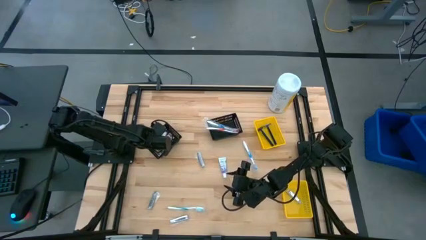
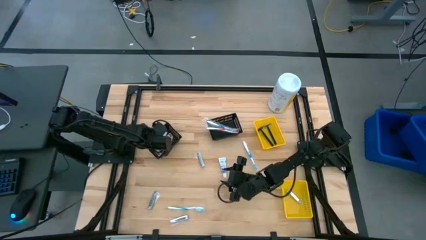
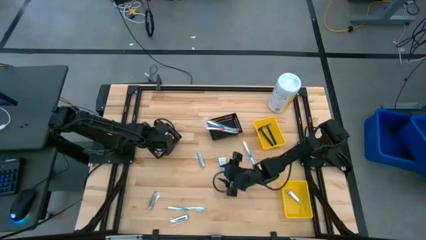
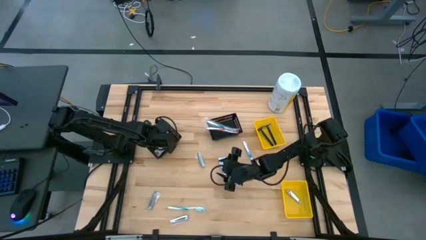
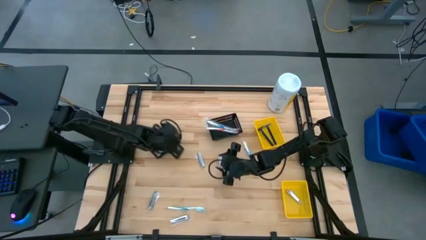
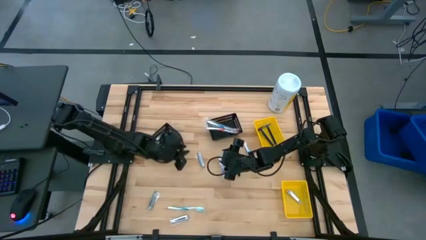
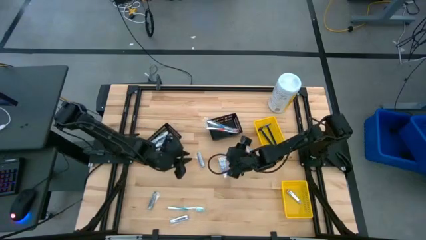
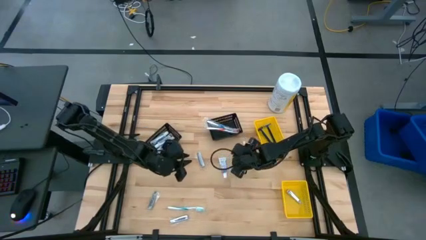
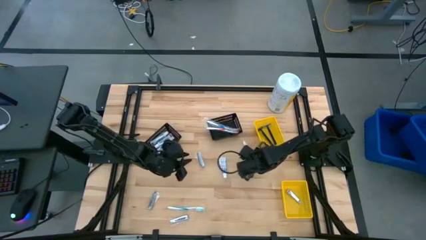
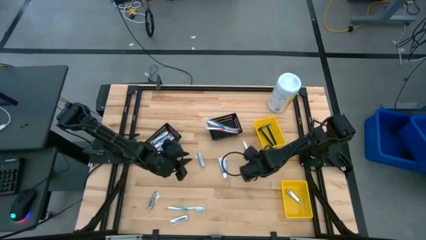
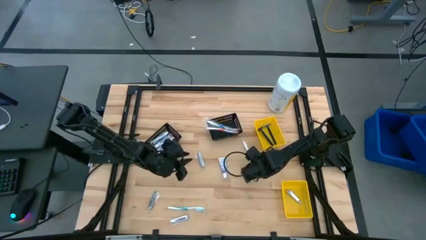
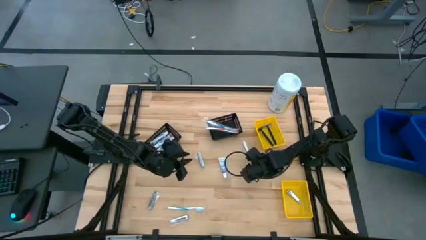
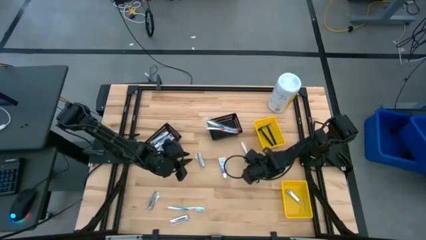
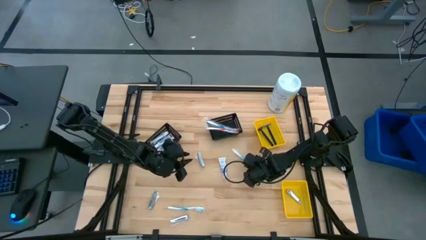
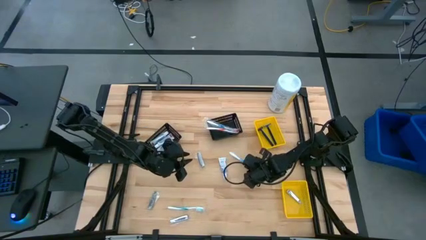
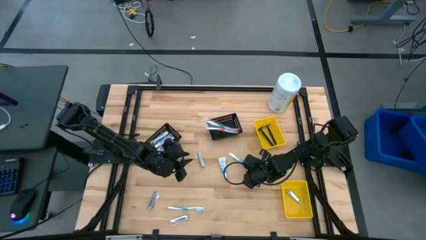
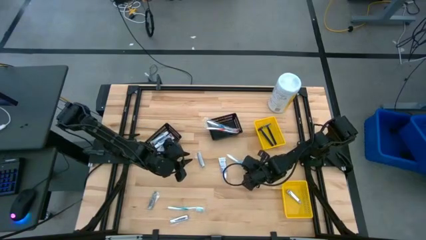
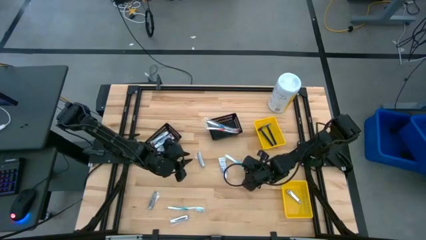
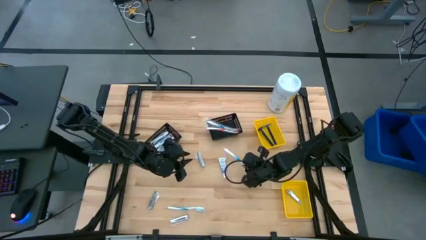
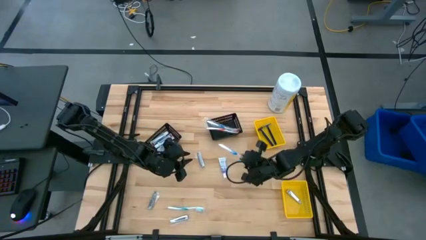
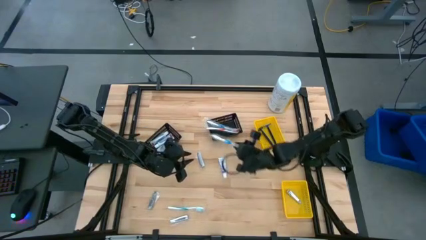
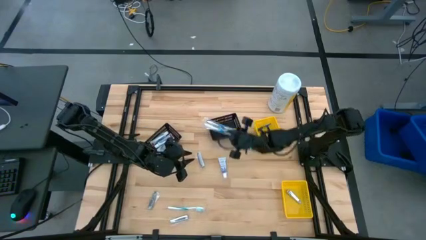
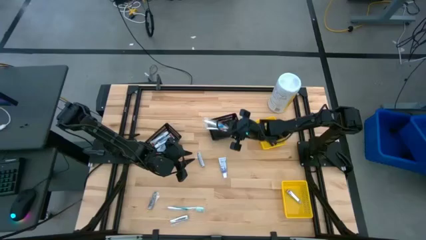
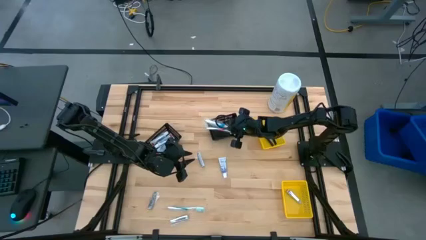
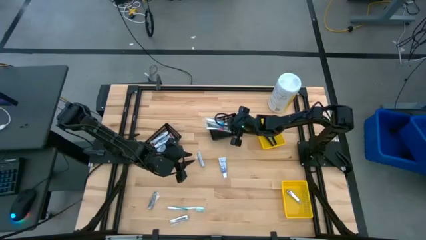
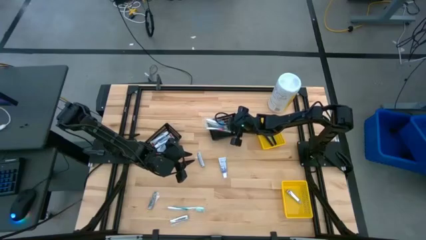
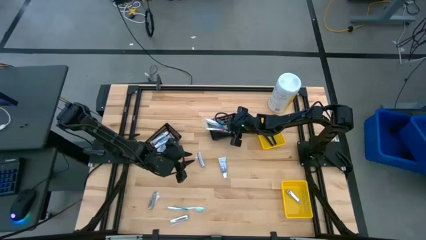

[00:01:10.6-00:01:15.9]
Task: Pick & Place Travel size toiletries
Put the blue toothbrush into the right black basket

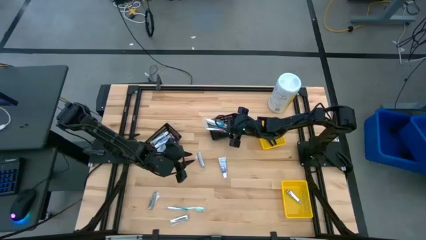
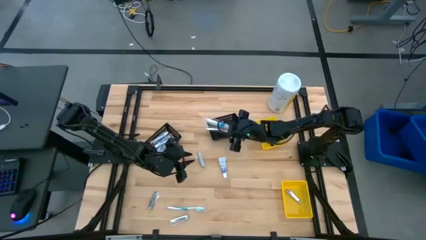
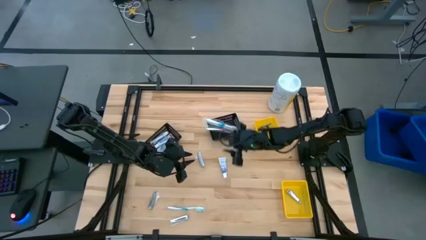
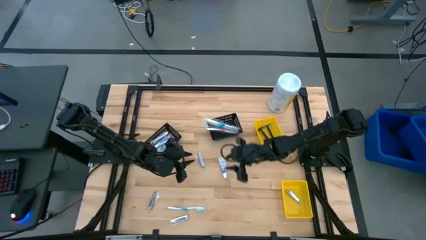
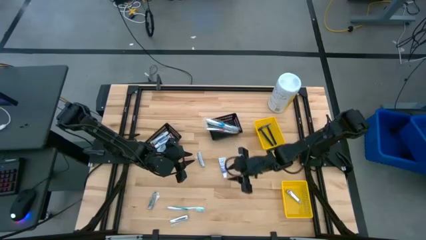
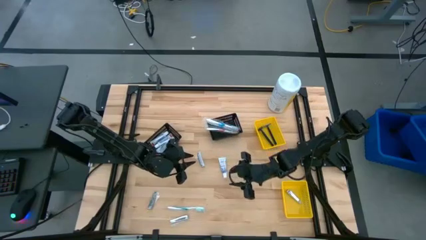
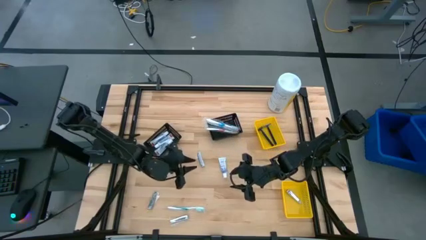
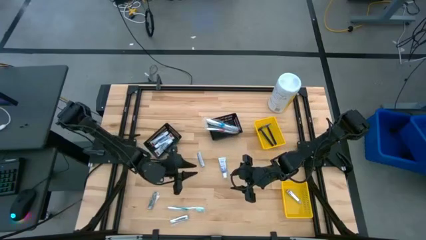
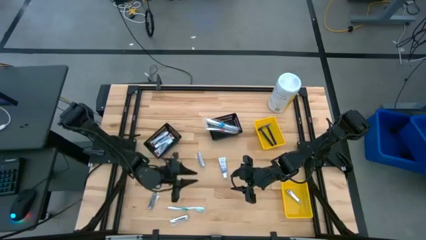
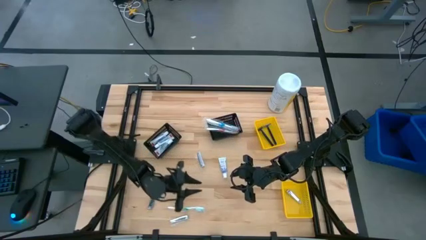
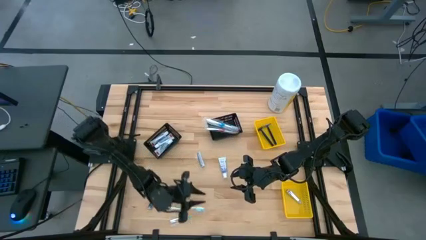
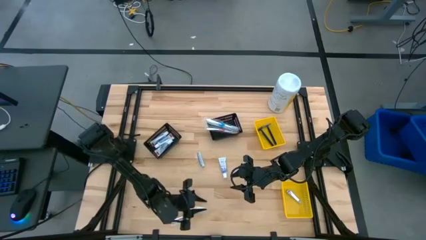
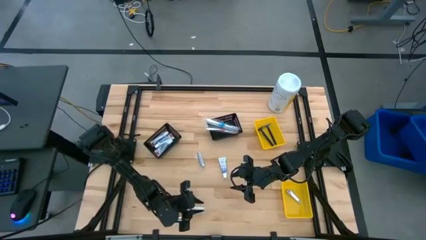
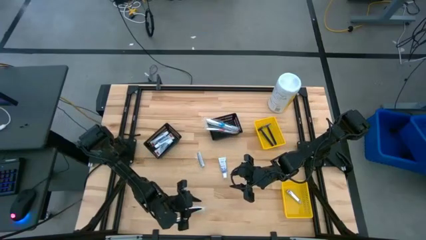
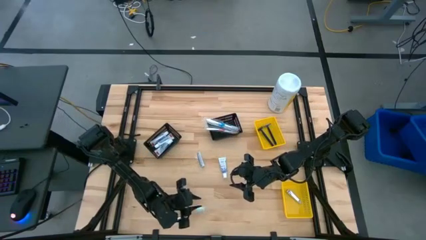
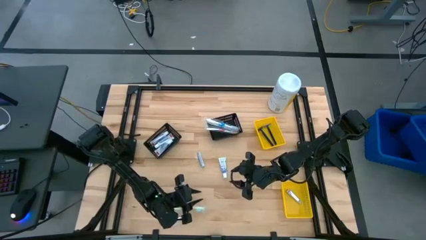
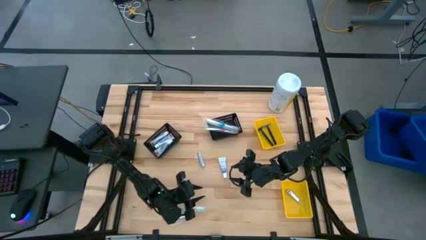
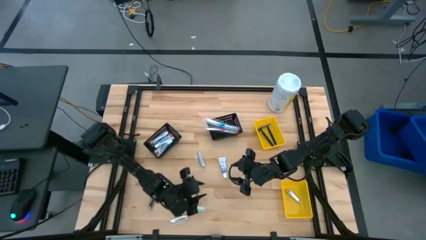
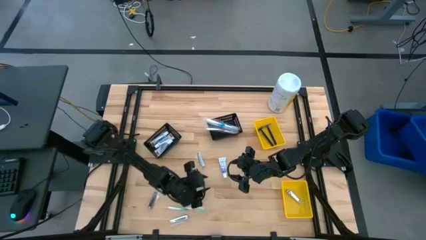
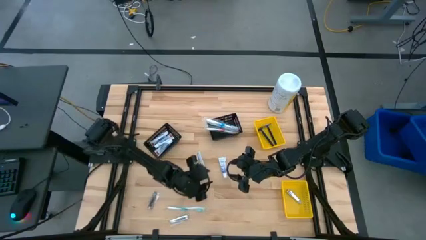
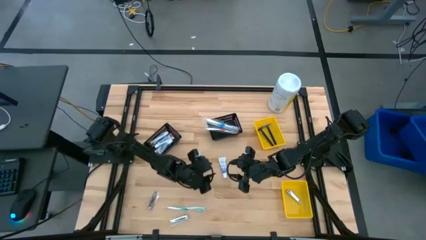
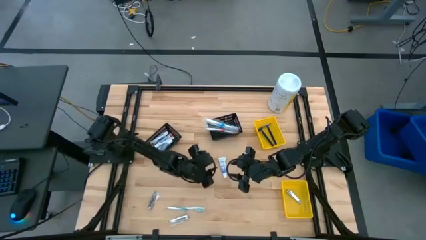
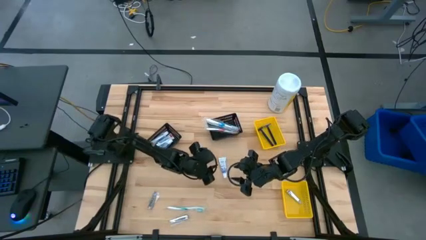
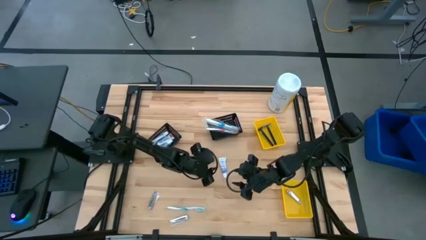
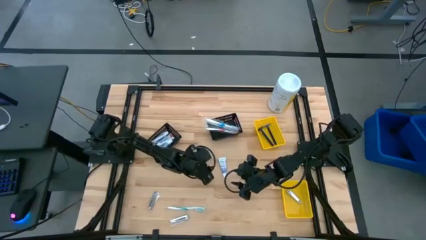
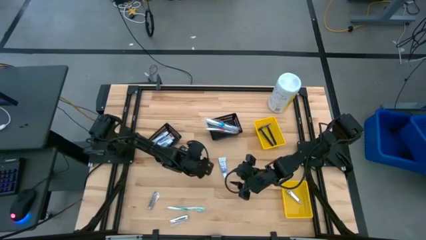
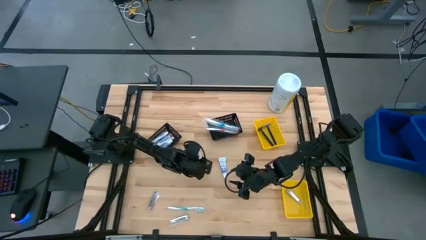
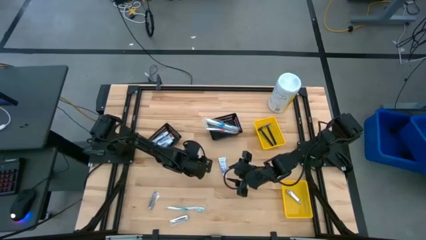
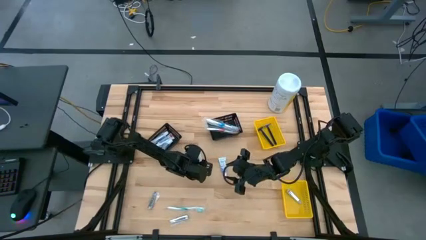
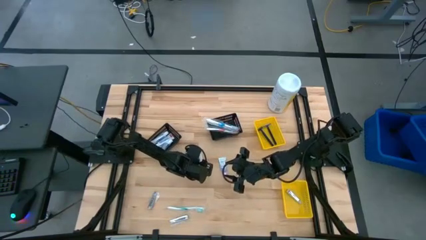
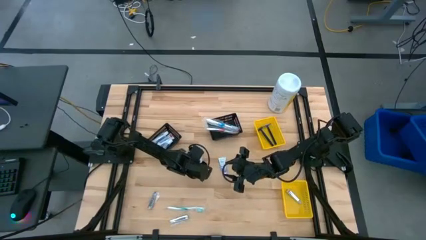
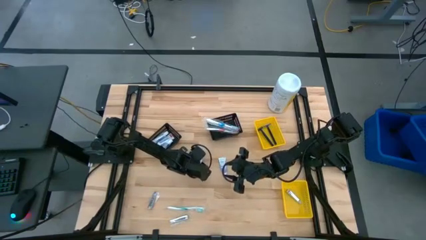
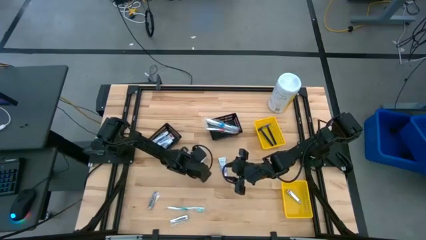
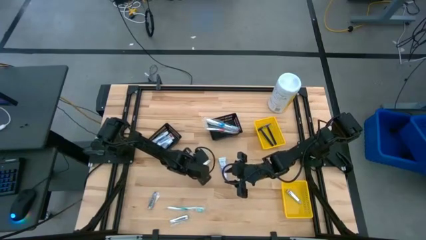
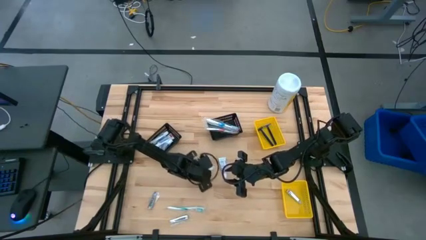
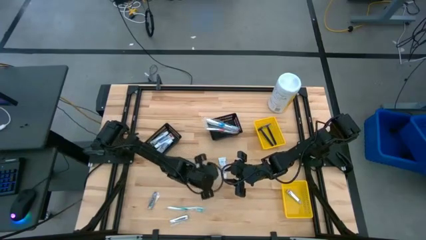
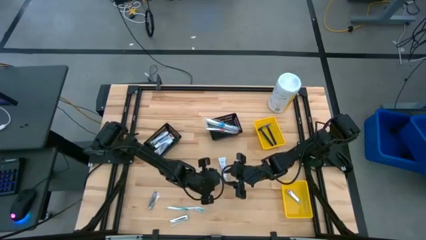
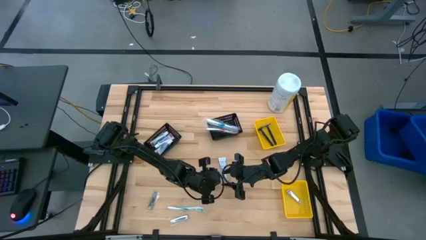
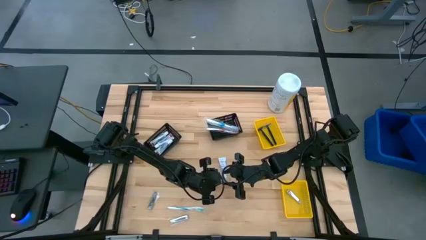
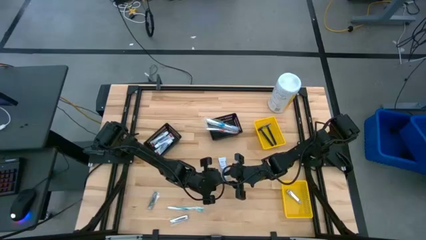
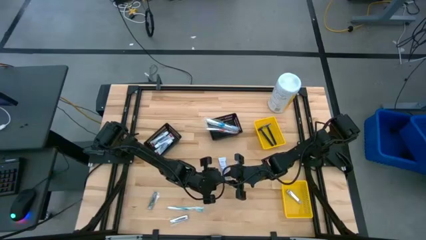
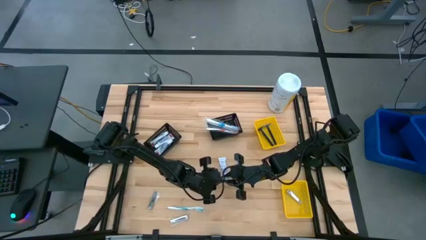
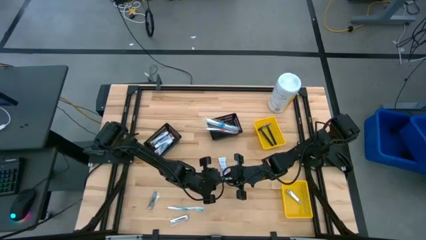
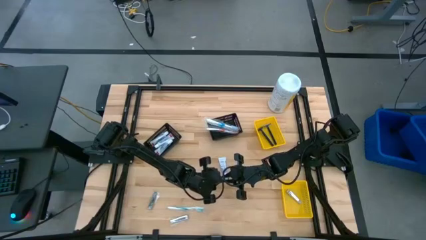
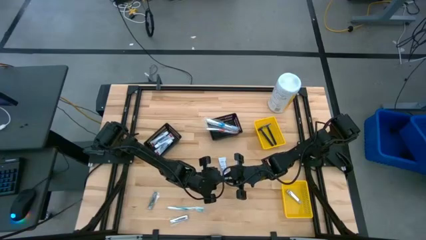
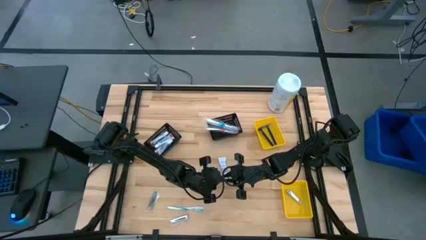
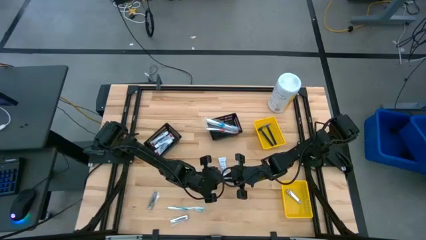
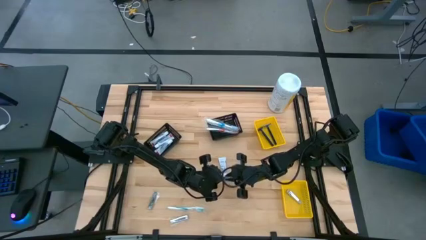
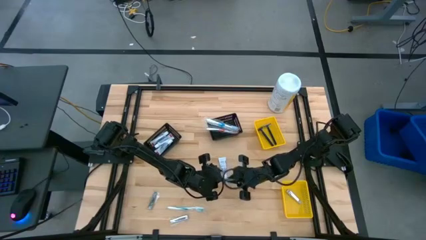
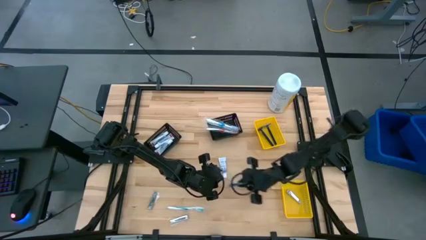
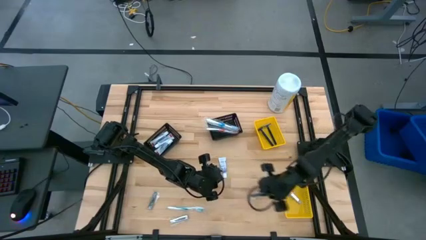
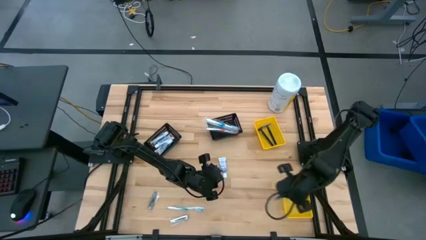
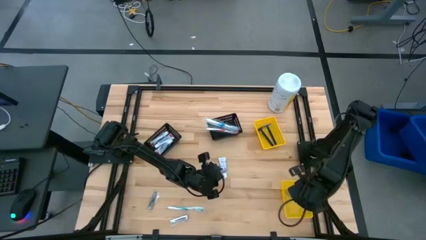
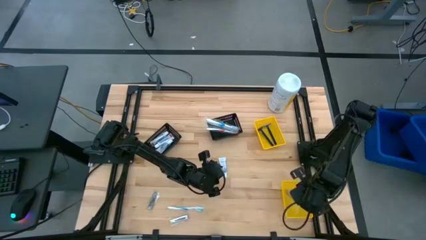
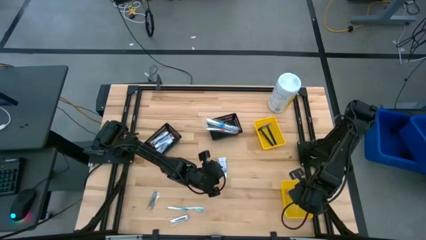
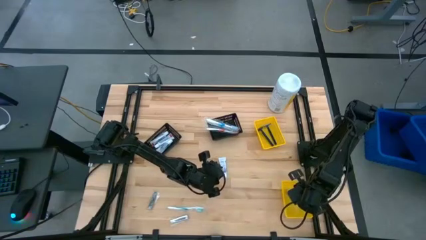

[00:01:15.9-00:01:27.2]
Put the silver nail cutter into the bottom yellow basket
